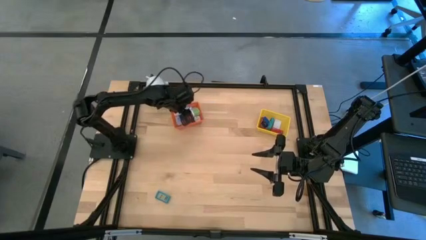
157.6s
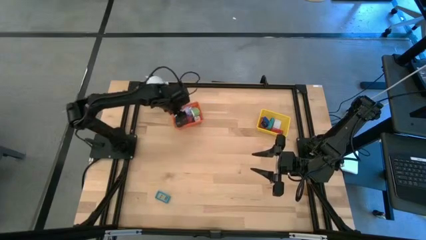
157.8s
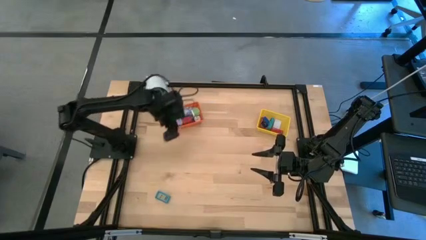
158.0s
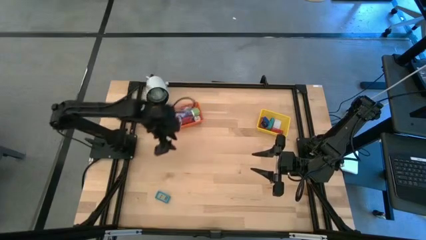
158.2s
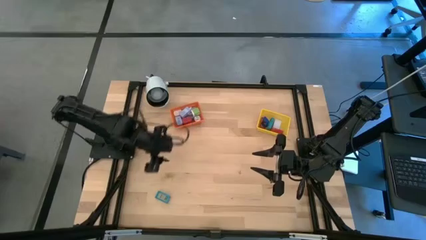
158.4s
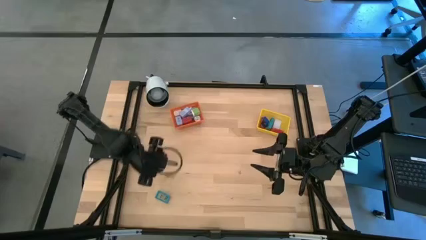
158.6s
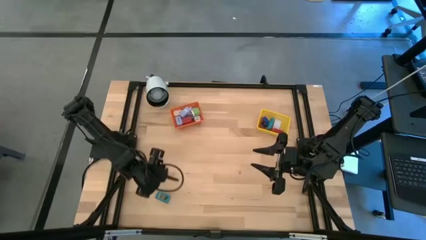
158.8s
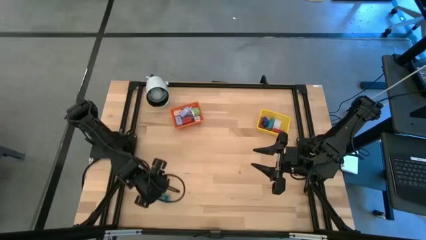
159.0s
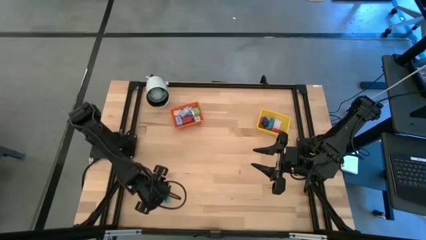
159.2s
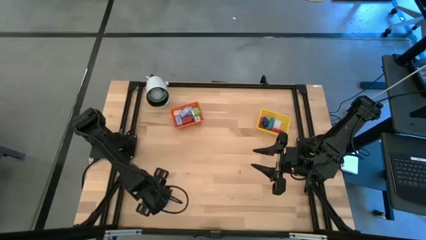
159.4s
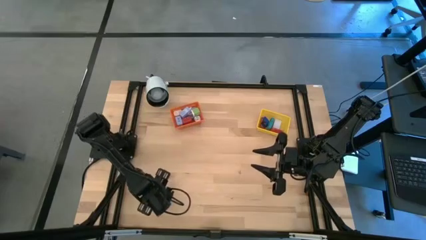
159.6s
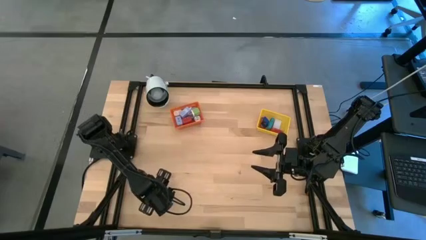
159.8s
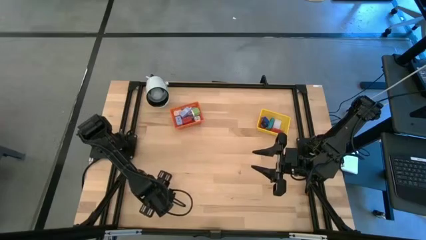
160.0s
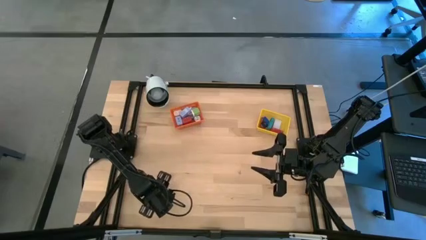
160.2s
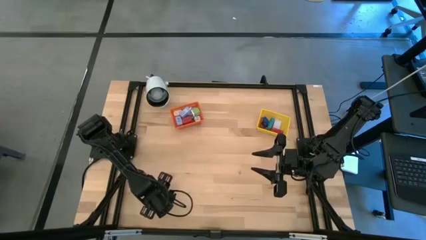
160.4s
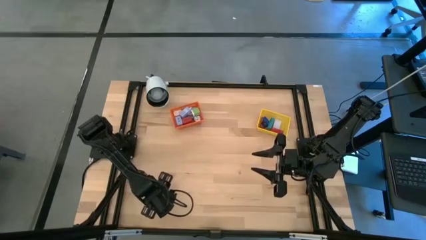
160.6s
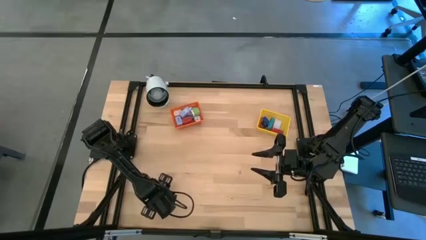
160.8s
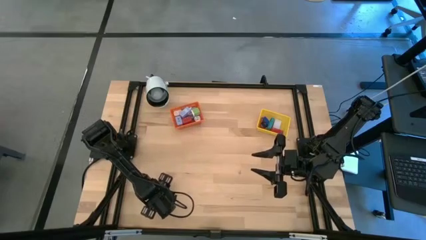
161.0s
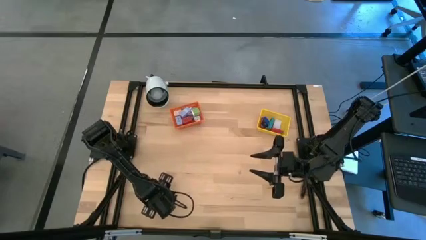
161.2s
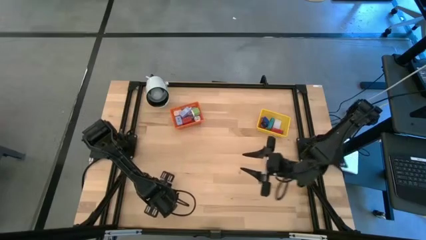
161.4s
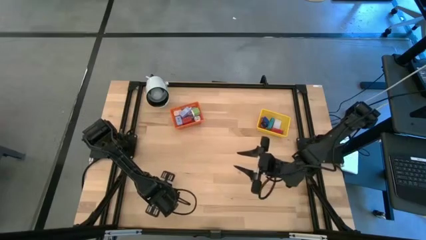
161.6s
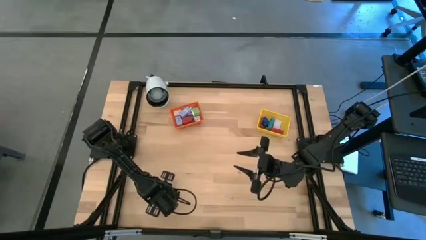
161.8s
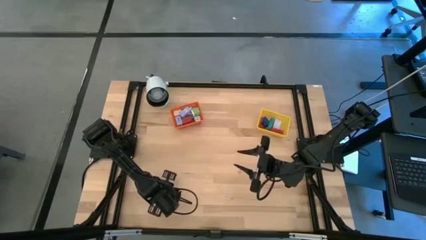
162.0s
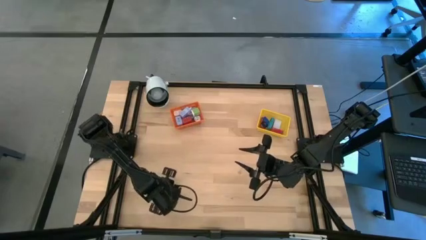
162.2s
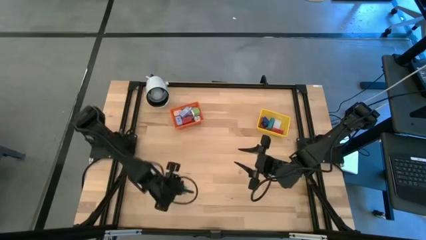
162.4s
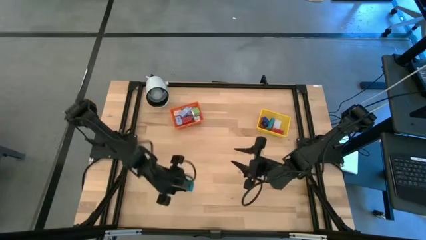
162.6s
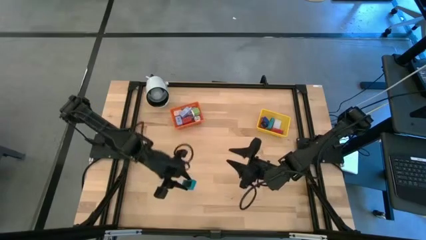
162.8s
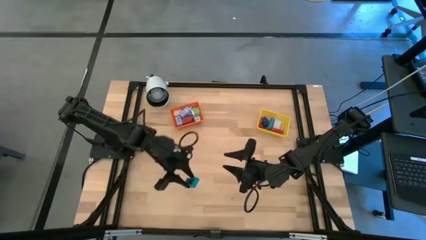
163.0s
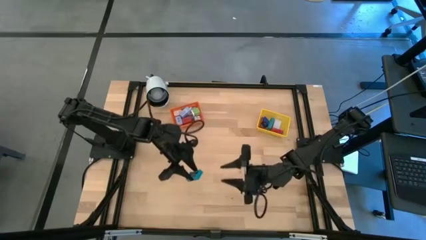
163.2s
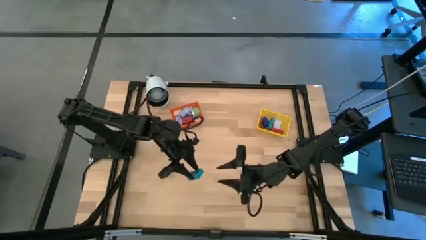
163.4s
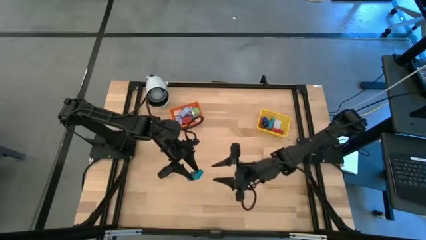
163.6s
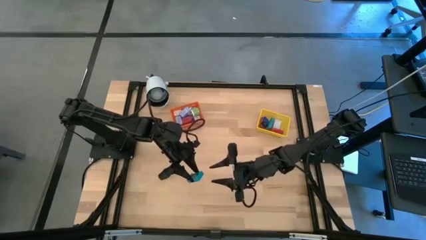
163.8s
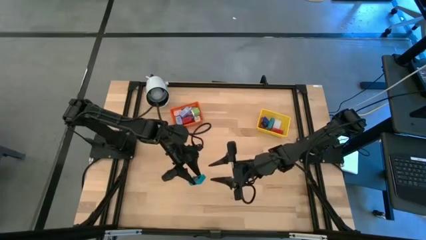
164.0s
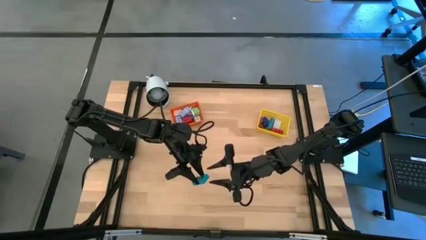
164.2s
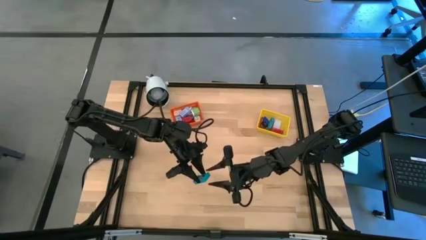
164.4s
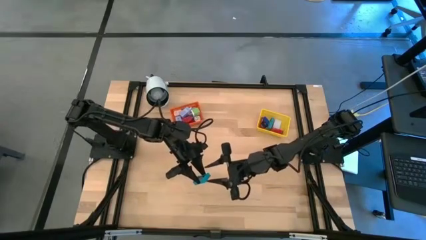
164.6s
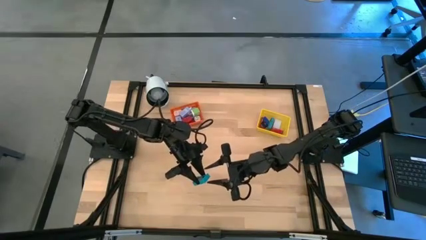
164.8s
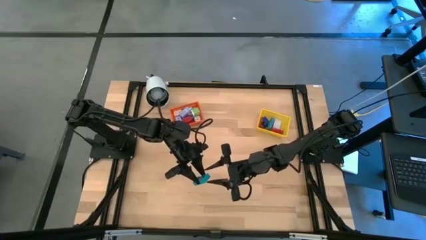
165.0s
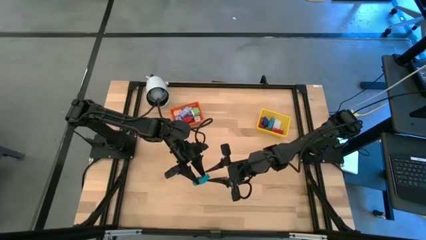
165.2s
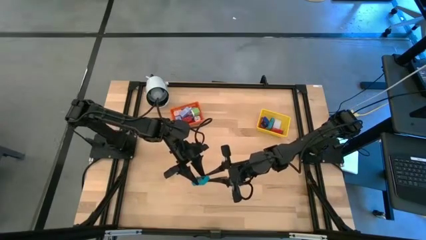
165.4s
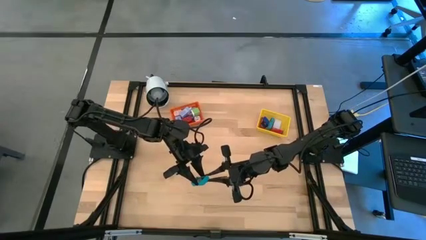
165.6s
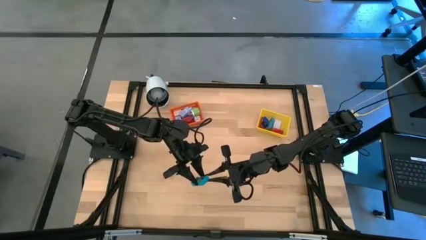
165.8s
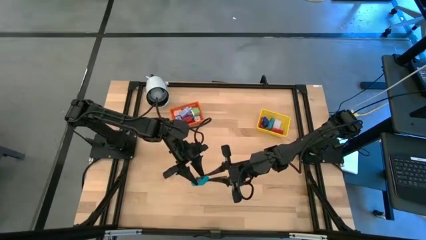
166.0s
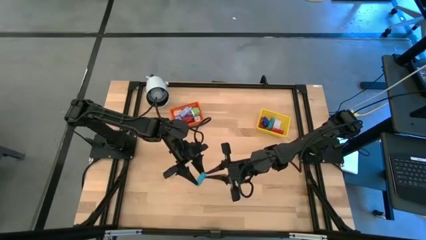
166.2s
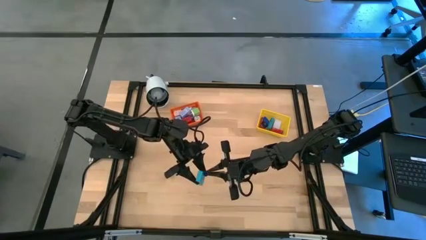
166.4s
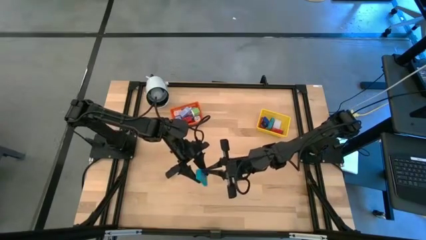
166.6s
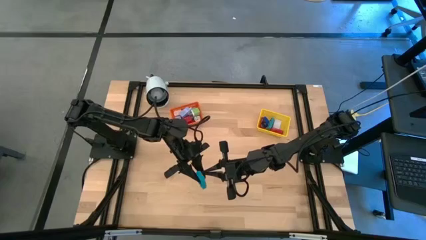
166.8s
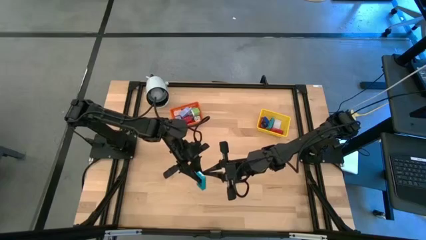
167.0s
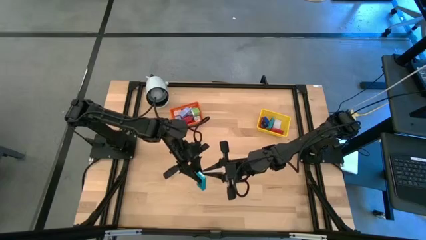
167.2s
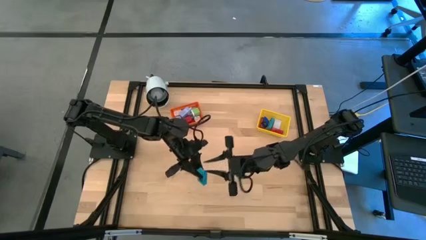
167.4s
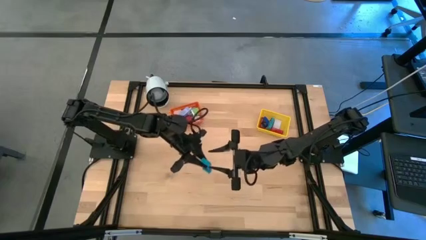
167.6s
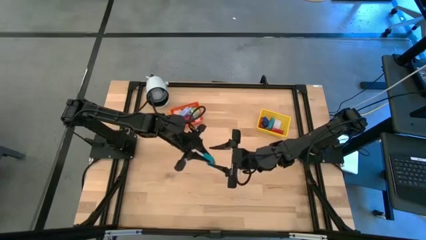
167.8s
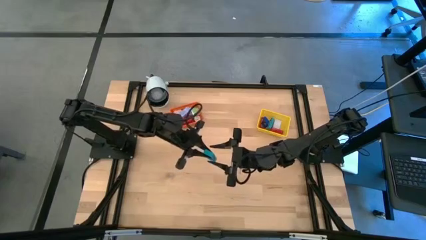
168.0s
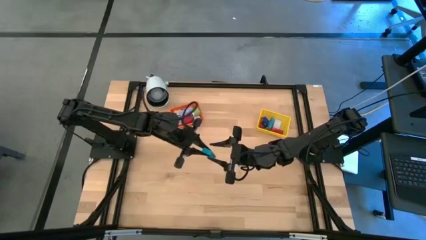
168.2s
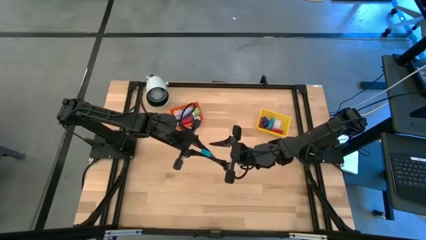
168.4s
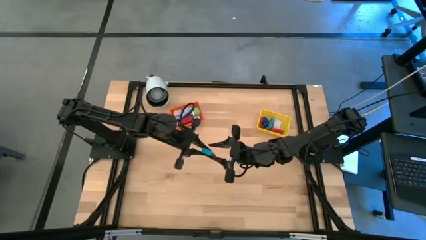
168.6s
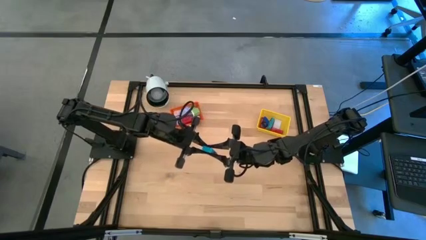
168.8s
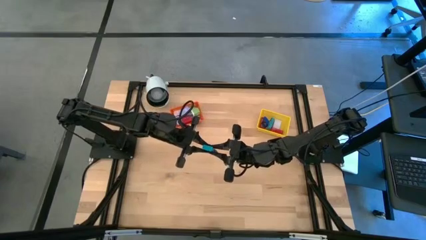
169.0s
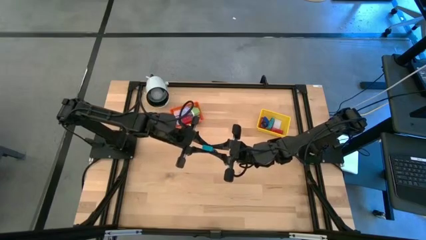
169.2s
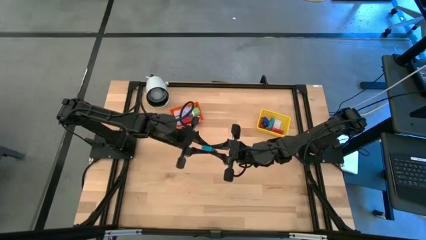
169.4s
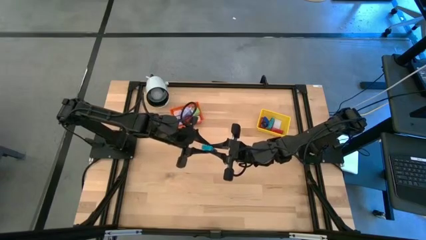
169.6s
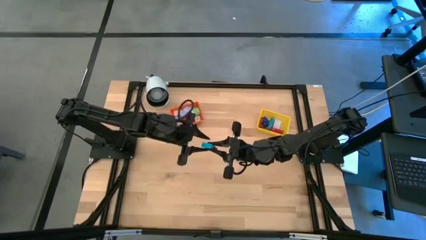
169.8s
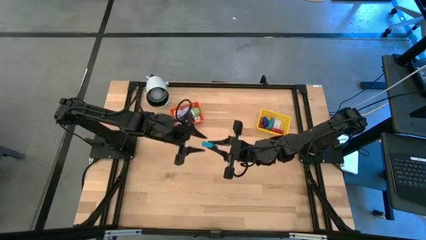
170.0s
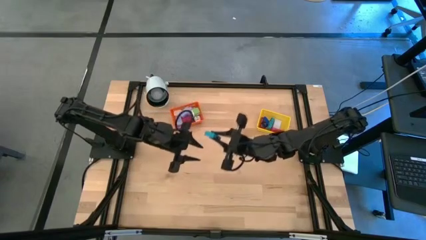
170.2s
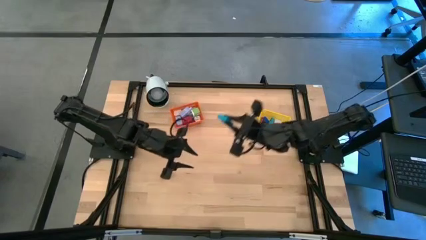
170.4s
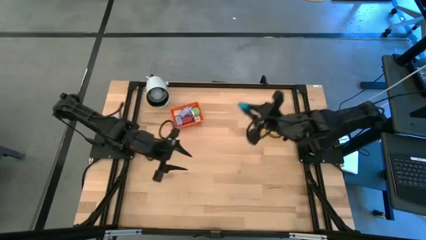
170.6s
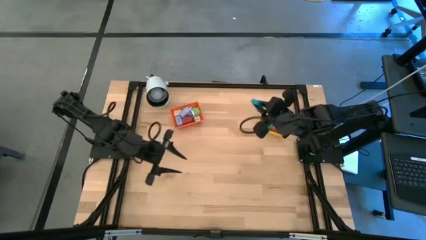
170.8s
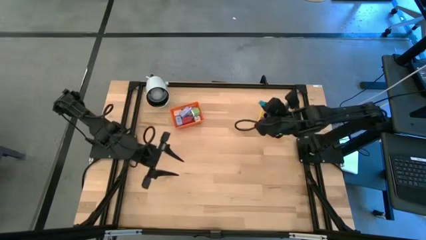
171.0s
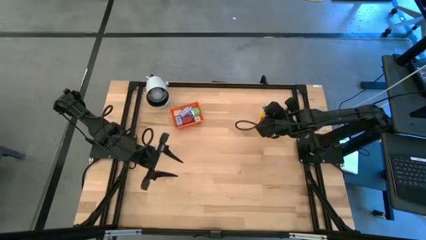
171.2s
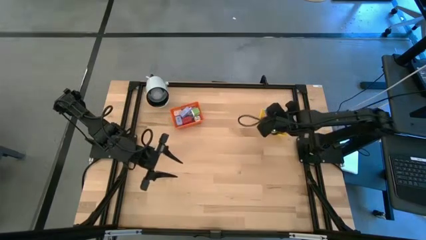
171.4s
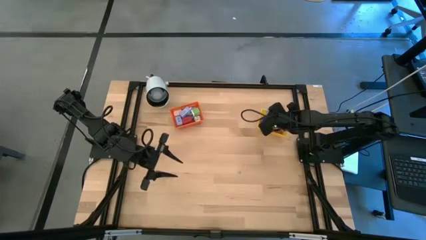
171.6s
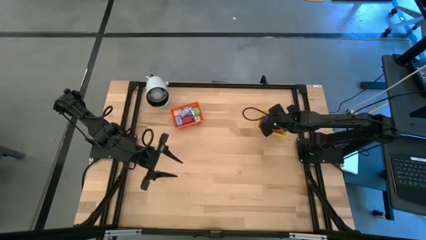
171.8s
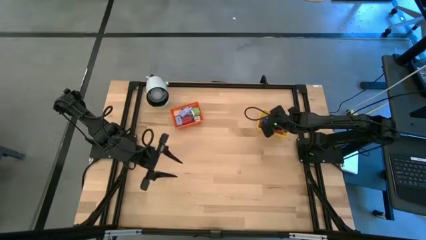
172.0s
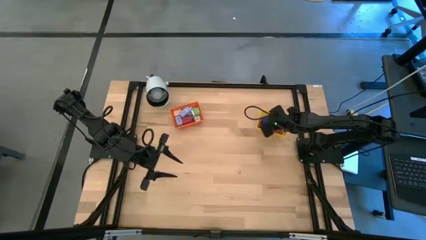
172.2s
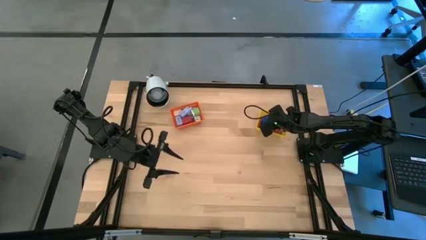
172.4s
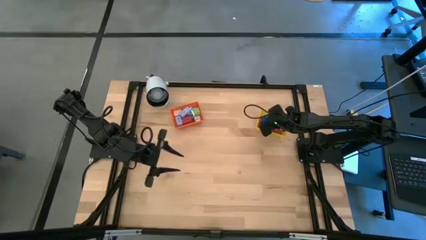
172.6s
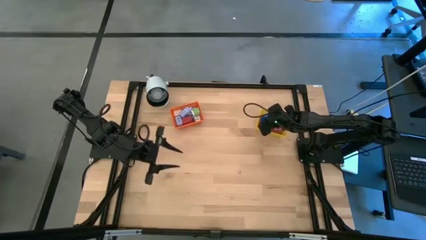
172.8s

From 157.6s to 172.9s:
Task: Pick & Place Office items
Put the light blue digital clock into the yellow bin
